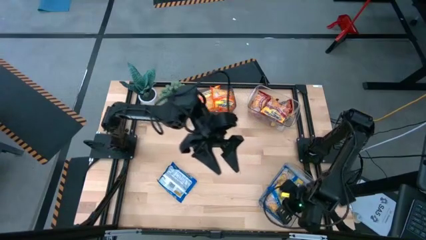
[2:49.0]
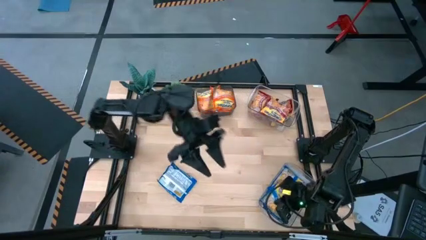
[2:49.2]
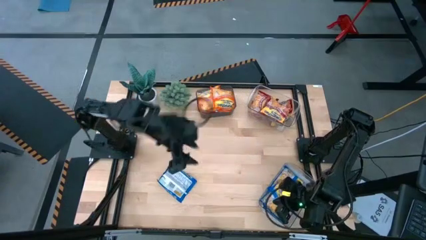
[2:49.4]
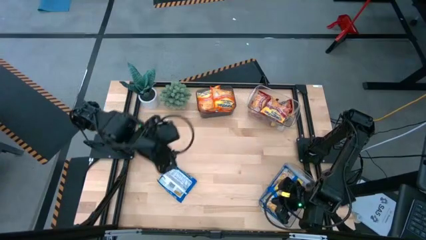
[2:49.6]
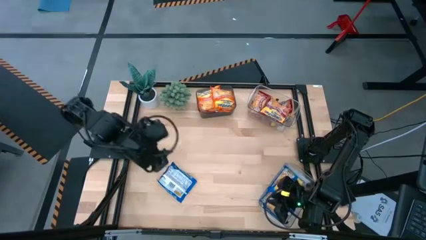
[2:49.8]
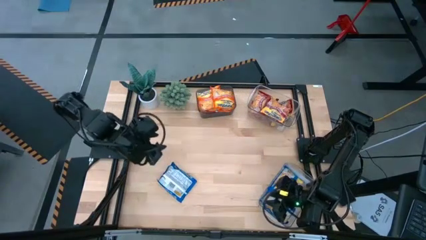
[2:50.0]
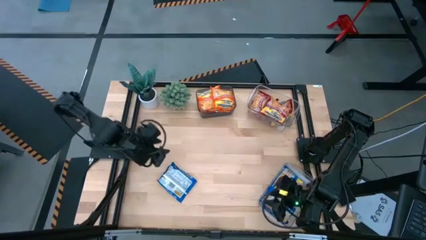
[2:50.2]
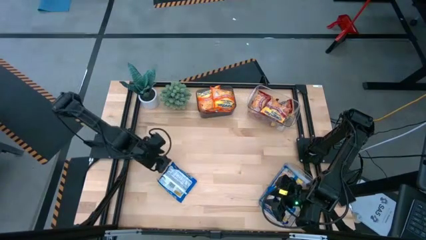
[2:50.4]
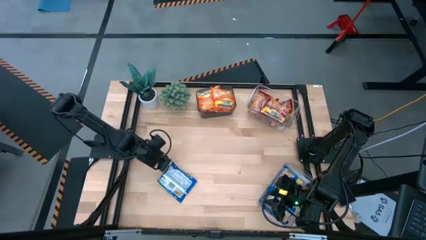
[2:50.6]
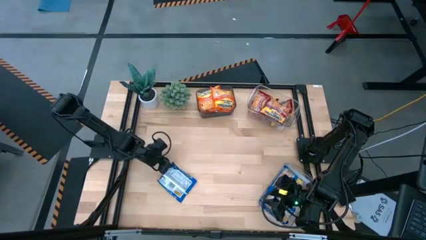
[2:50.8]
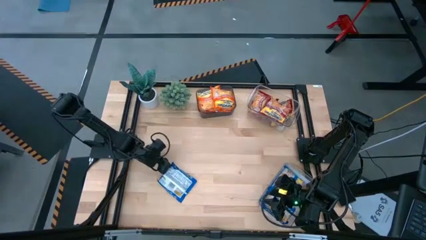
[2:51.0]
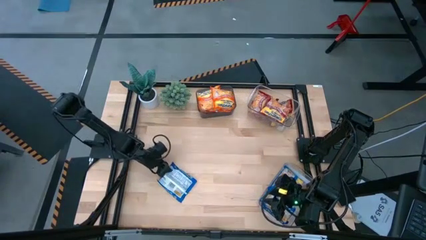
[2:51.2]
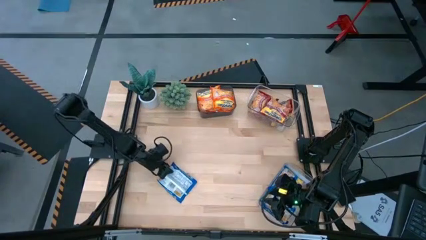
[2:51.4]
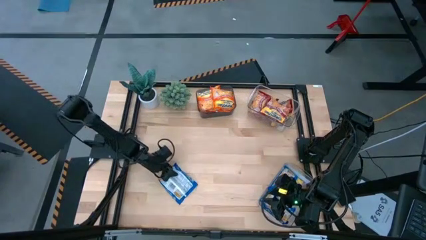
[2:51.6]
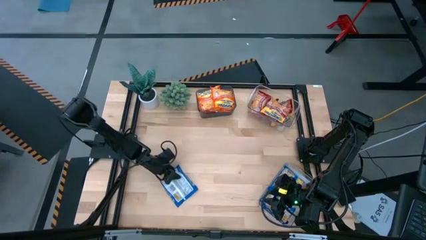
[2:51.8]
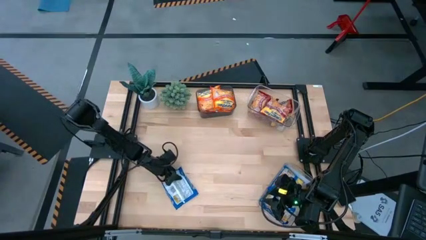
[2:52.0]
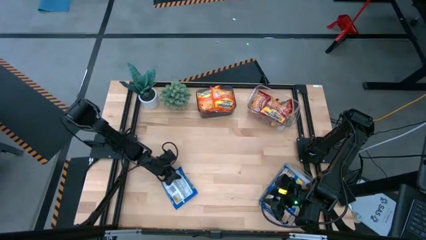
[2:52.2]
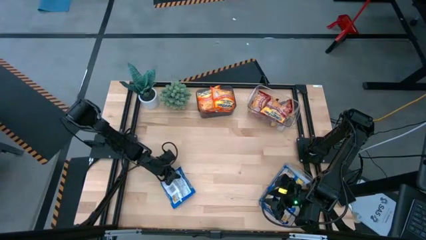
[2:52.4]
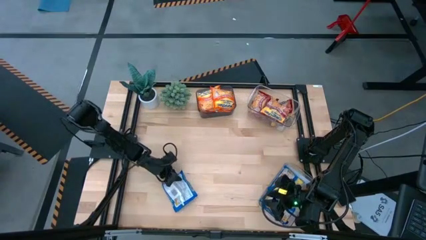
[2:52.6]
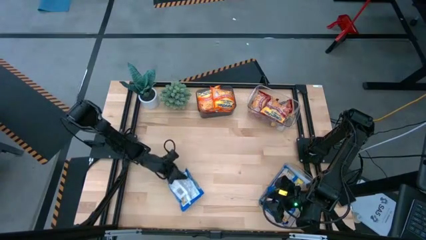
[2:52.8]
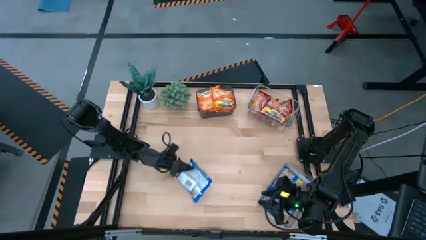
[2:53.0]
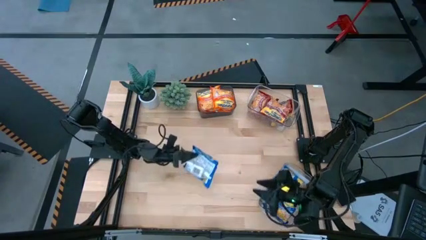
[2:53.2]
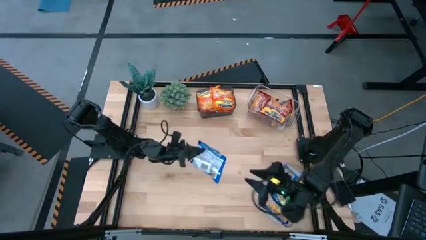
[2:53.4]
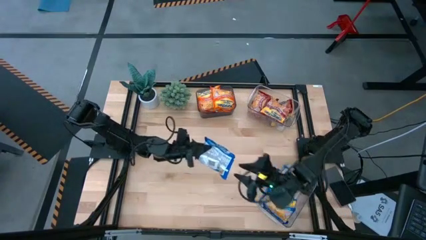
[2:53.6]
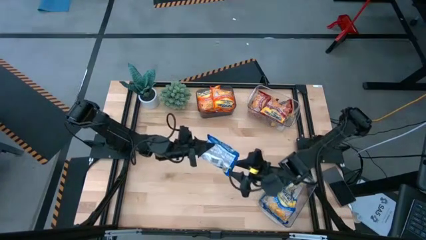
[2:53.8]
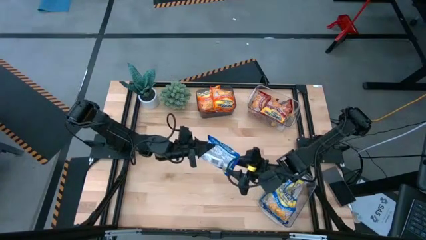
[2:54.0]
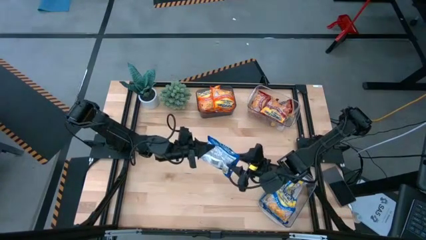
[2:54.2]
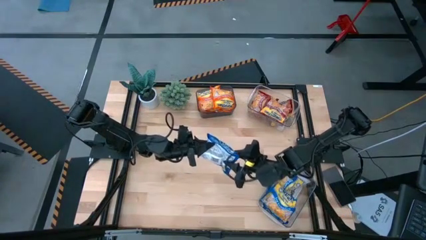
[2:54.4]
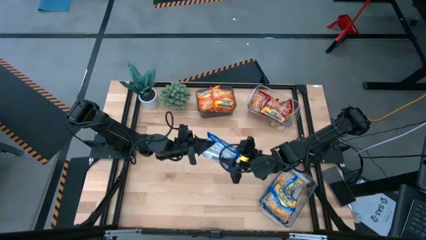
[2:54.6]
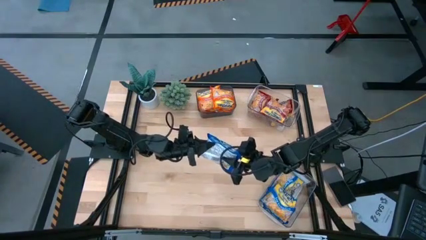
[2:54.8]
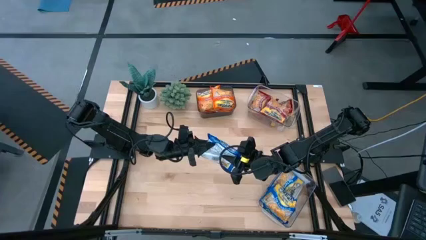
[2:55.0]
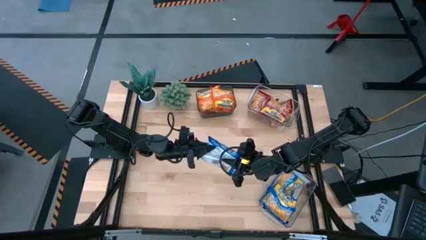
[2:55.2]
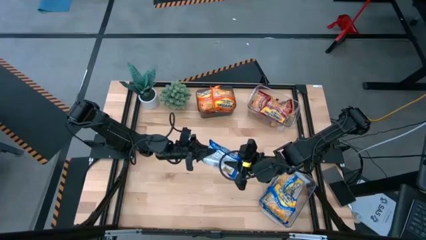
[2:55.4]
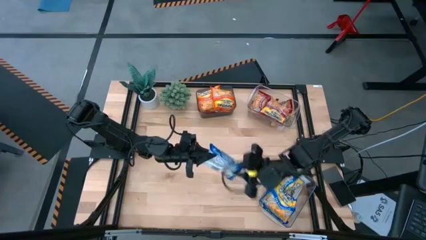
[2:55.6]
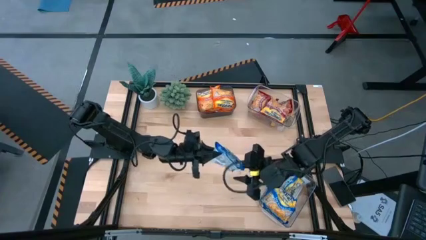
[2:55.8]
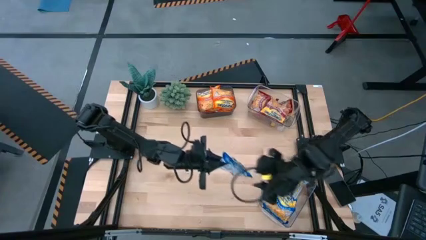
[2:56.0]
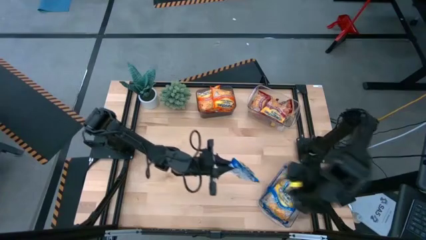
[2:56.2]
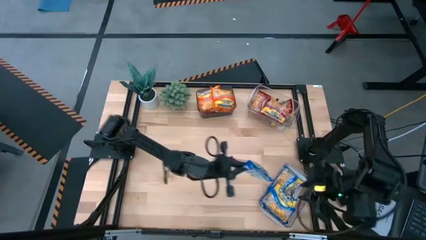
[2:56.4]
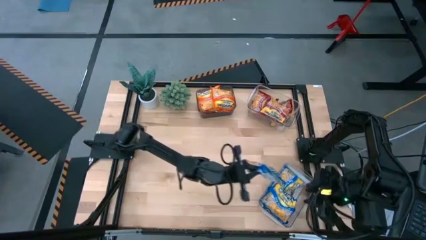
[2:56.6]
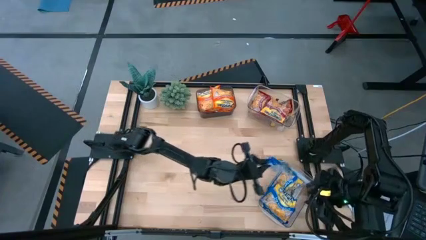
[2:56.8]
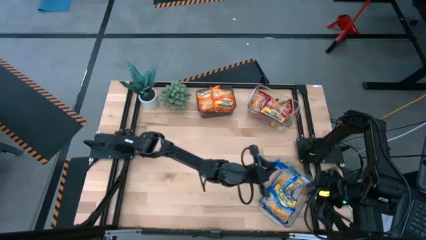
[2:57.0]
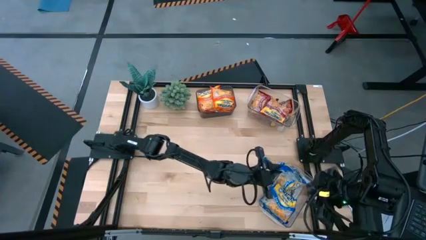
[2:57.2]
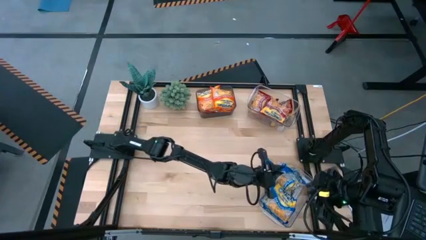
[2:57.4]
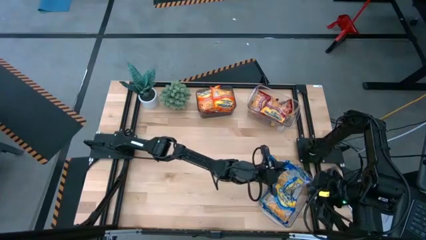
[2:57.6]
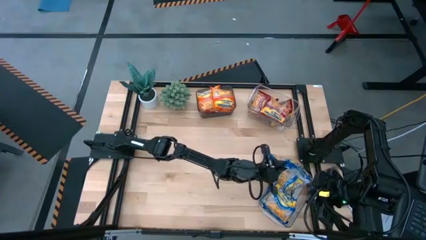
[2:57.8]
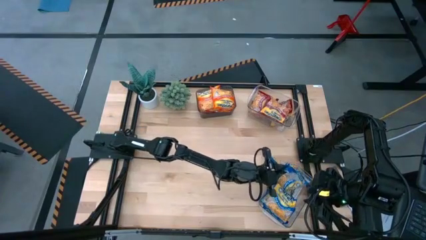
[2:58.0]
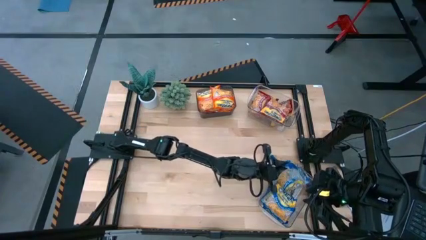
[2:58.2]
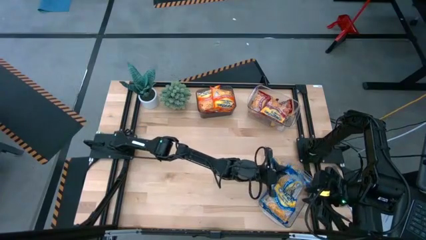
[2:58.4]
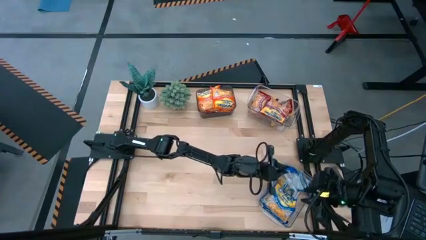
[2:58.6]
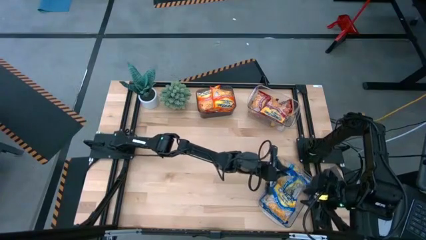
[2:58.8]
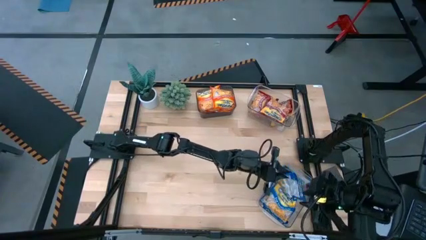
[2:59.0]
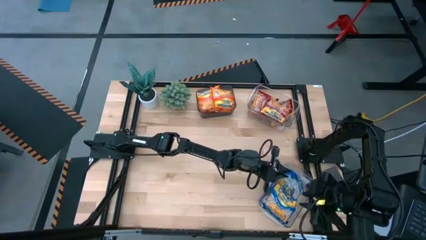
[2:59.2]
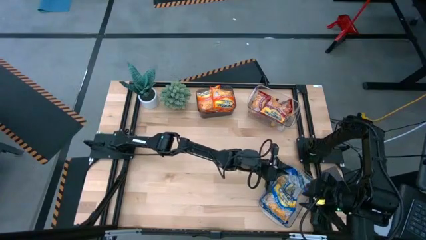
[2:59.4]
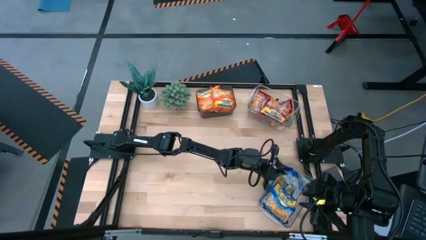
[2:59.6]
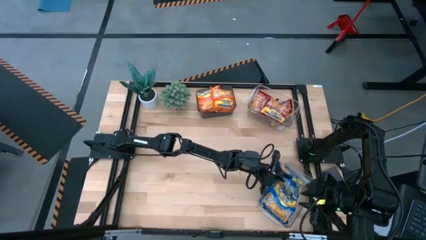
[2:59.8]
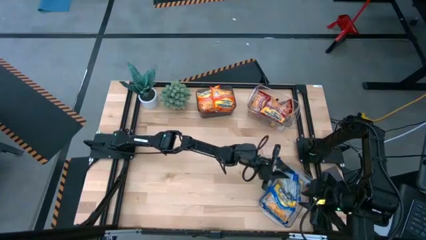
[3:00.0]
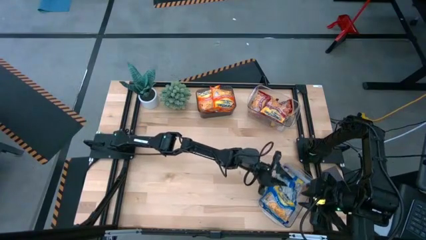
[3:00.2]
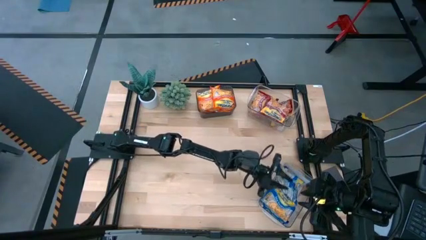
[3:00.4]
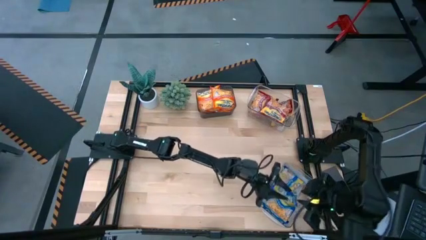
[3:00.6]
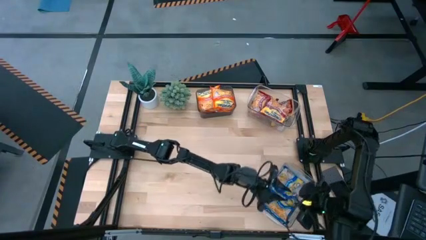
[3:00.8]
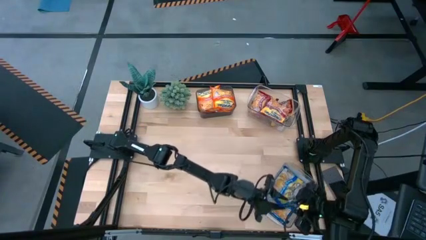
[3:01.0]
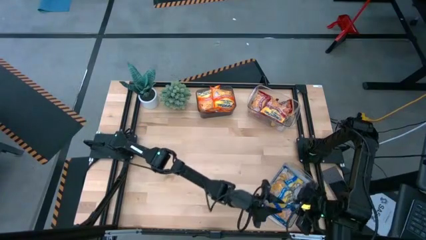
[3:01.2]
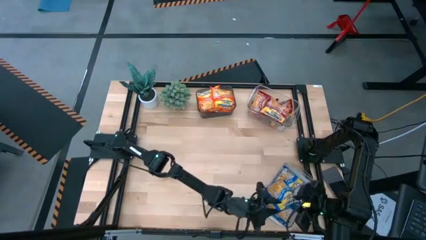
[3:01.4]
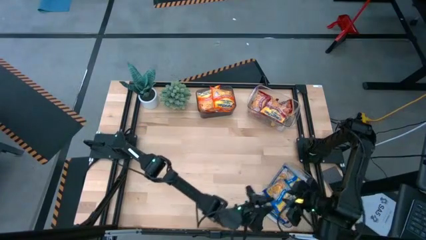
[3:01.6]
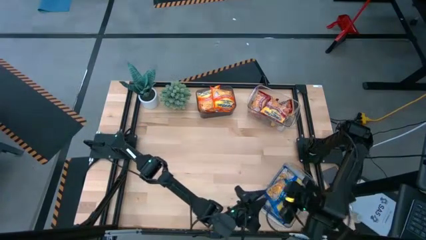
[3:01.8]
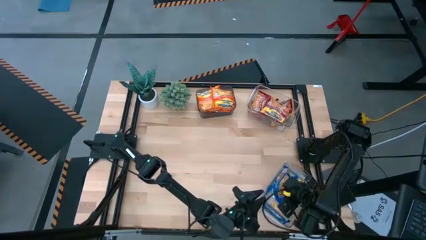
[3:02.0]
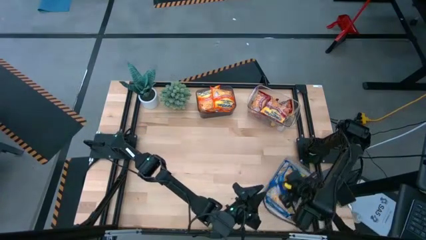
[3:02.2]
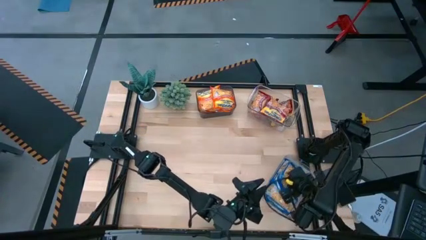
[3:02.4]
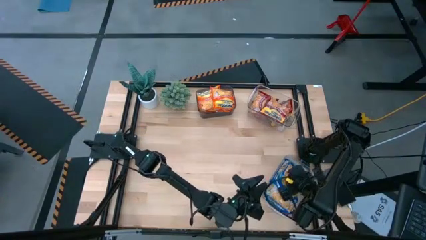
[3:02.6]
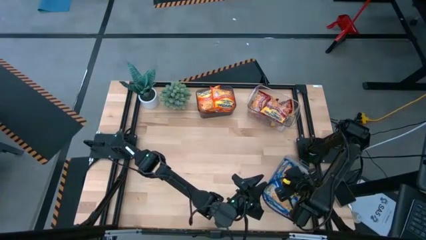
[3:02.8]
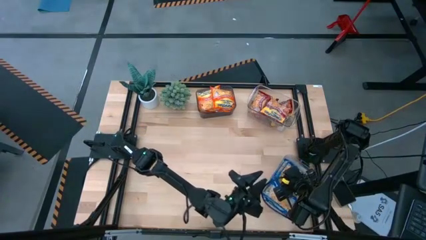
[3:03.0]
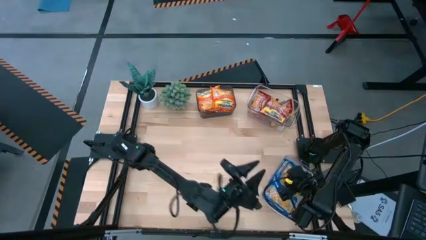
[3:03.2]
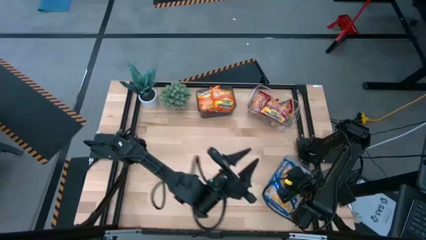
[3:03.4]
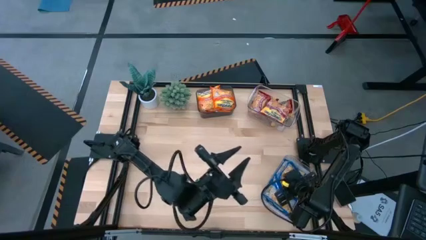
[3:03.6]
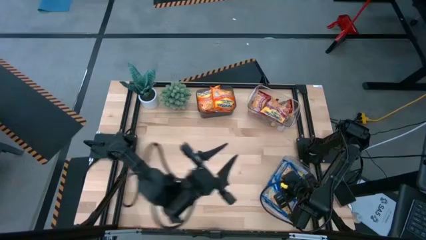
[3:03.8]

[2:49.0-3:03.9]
Task: Sort Maruchan noodles
Put the blue noodle pack into the bottom transparent bin
